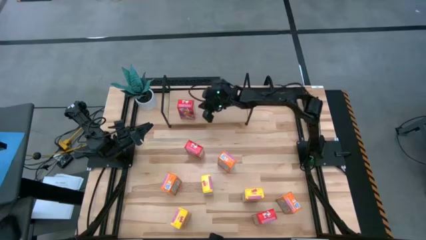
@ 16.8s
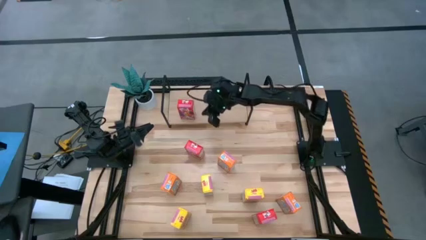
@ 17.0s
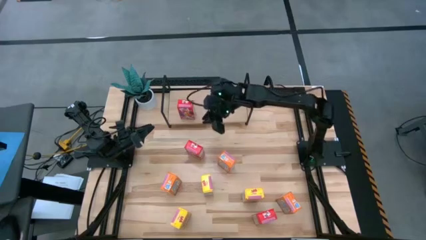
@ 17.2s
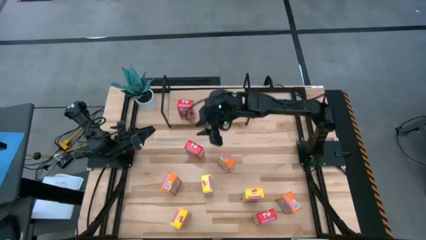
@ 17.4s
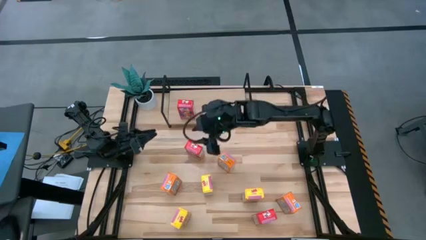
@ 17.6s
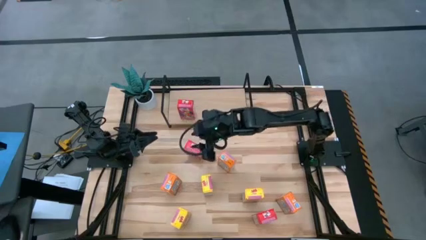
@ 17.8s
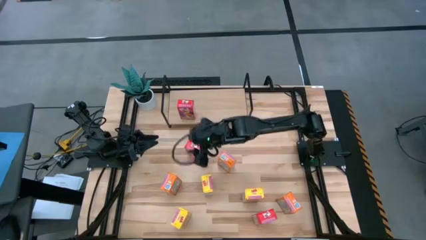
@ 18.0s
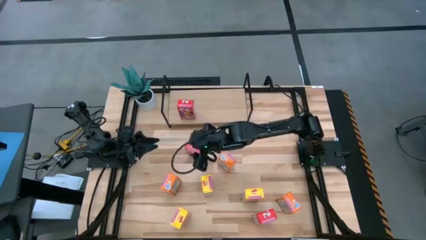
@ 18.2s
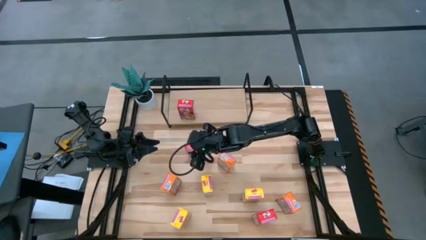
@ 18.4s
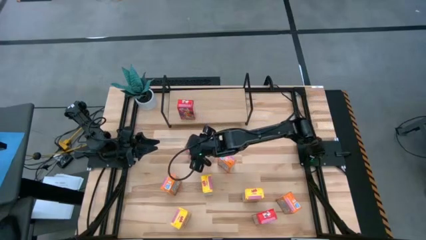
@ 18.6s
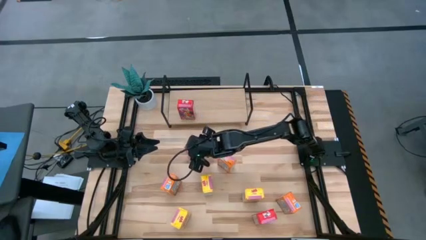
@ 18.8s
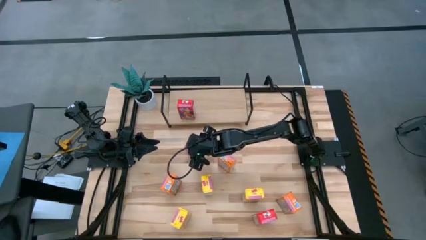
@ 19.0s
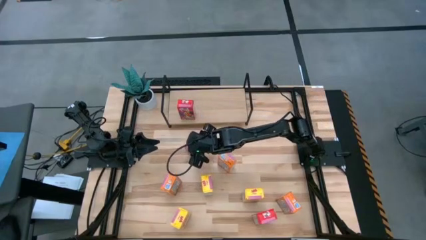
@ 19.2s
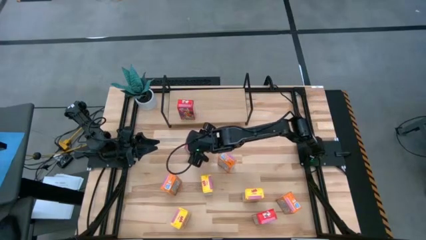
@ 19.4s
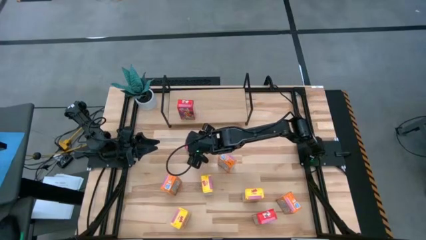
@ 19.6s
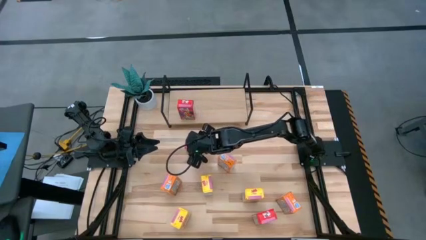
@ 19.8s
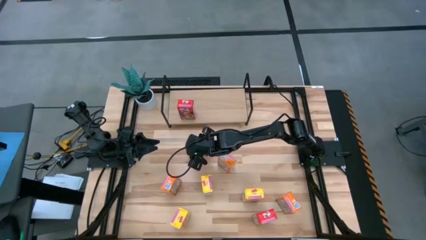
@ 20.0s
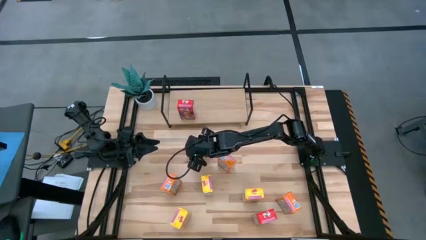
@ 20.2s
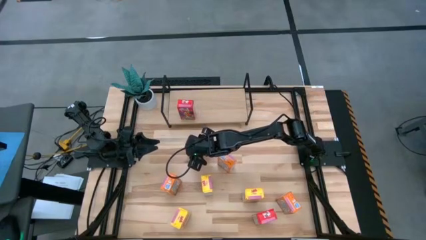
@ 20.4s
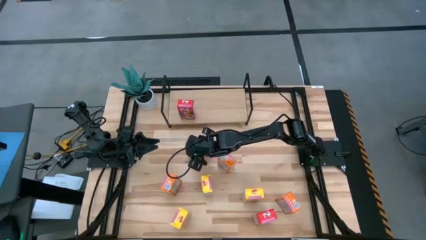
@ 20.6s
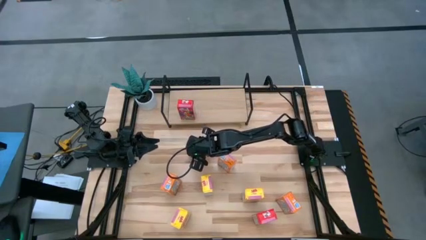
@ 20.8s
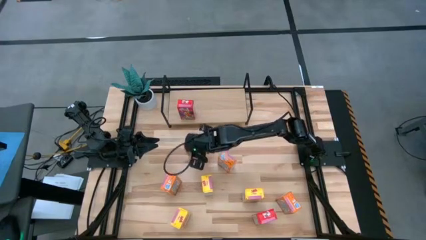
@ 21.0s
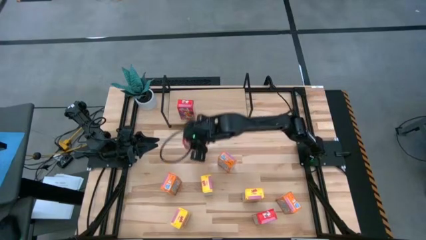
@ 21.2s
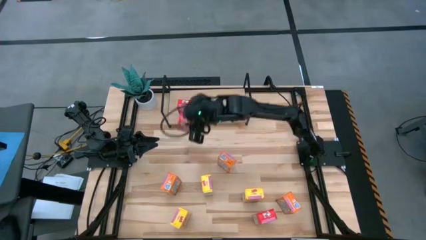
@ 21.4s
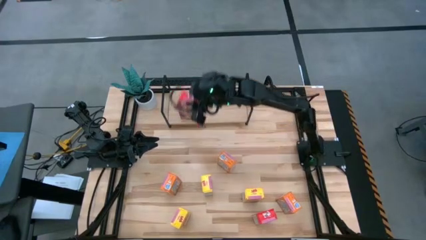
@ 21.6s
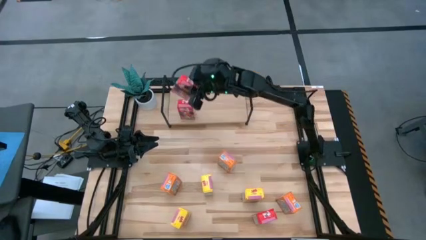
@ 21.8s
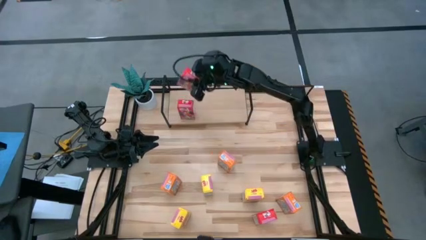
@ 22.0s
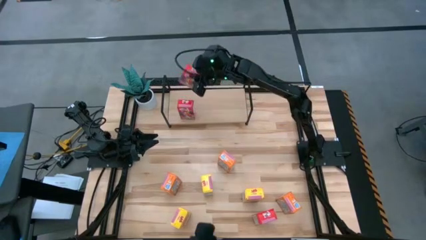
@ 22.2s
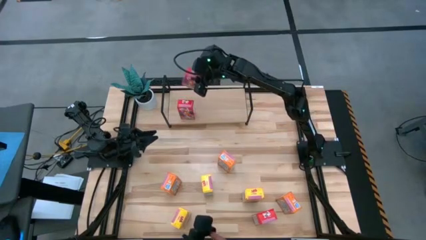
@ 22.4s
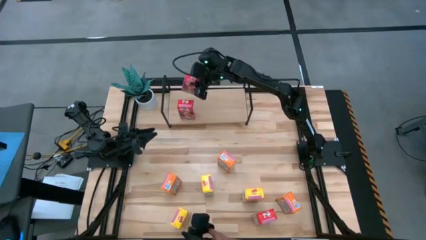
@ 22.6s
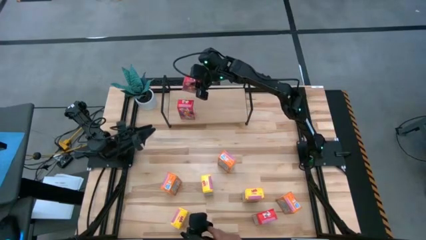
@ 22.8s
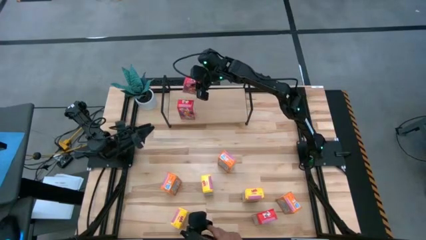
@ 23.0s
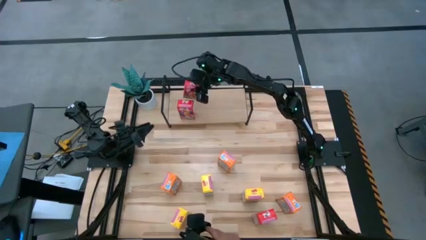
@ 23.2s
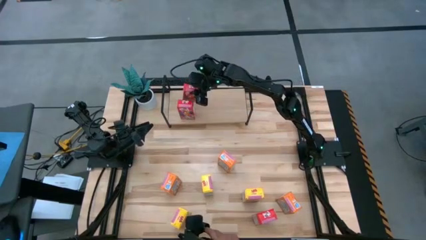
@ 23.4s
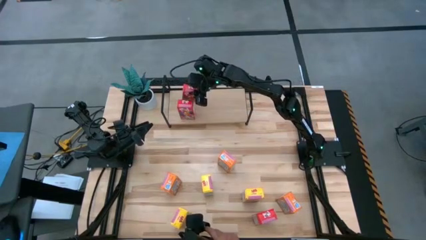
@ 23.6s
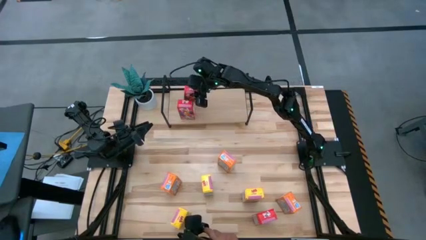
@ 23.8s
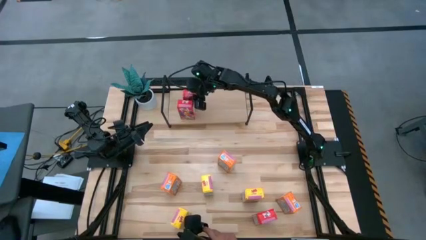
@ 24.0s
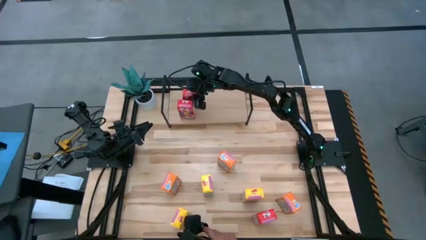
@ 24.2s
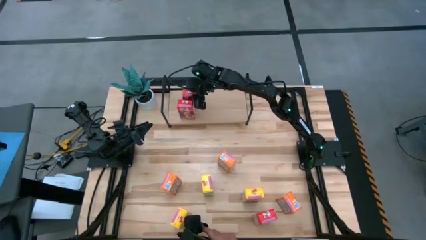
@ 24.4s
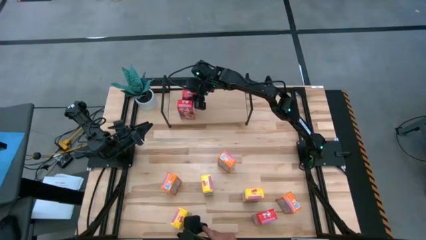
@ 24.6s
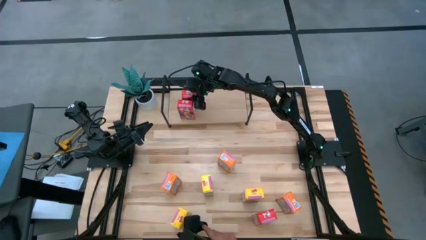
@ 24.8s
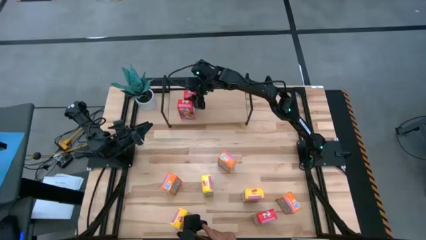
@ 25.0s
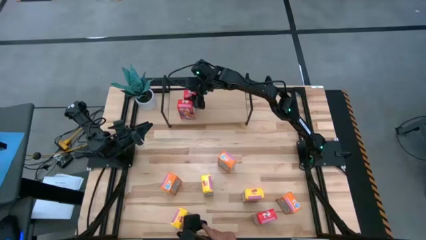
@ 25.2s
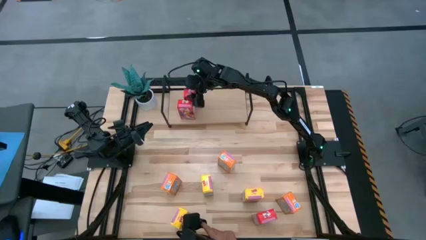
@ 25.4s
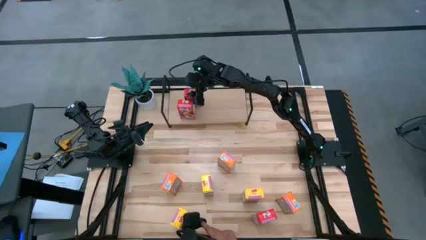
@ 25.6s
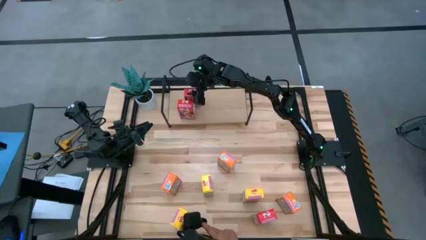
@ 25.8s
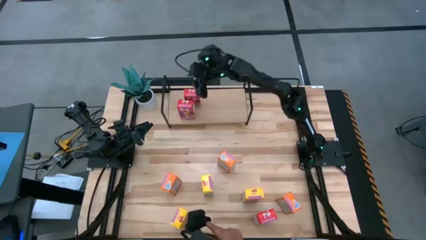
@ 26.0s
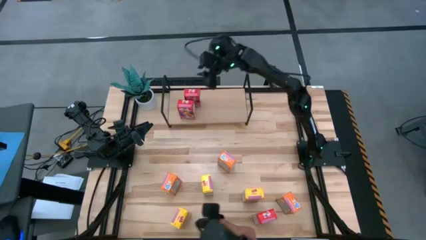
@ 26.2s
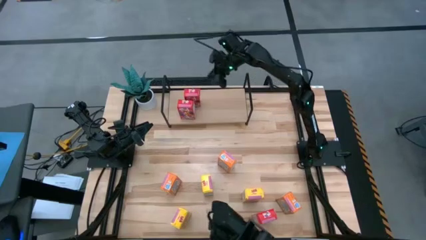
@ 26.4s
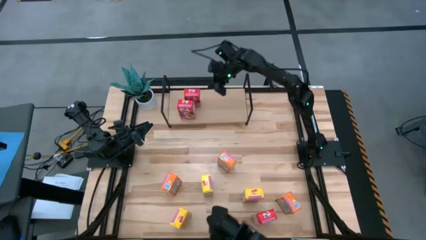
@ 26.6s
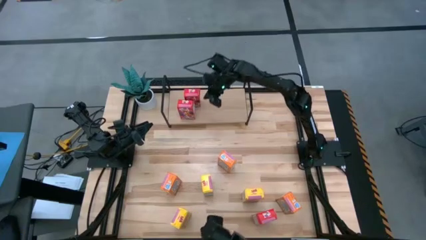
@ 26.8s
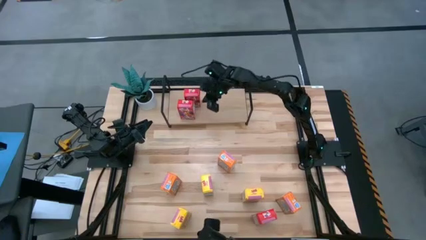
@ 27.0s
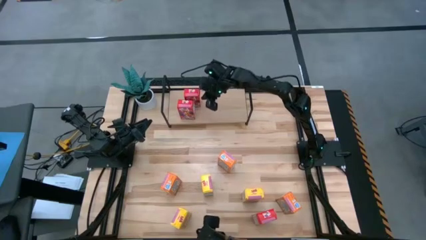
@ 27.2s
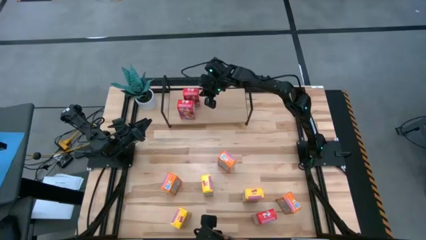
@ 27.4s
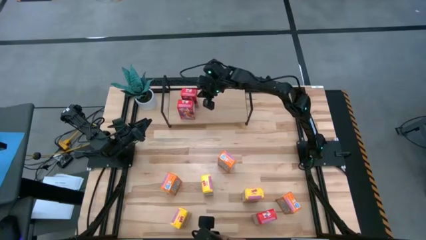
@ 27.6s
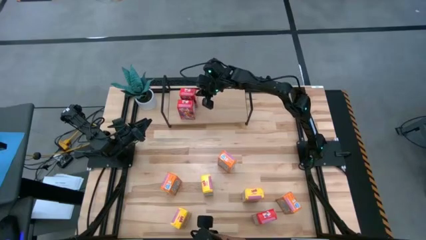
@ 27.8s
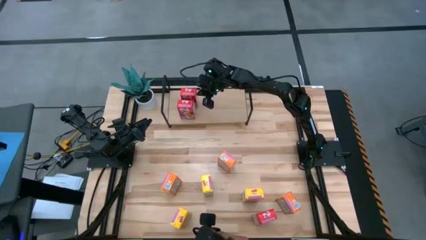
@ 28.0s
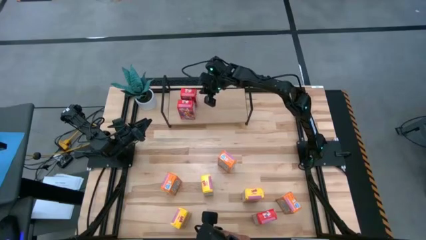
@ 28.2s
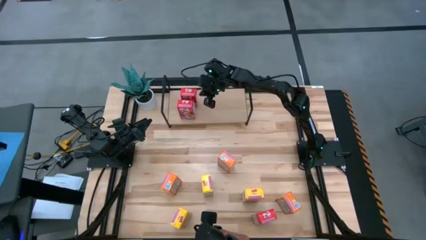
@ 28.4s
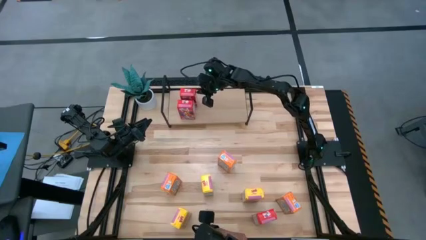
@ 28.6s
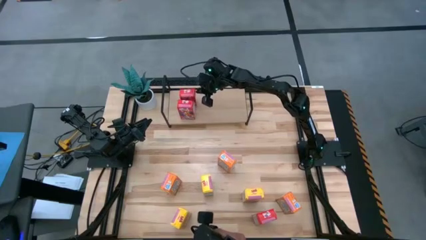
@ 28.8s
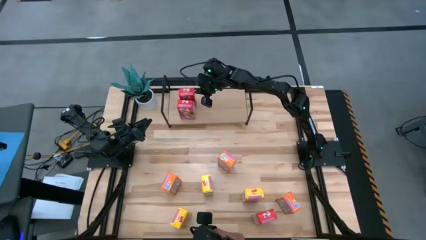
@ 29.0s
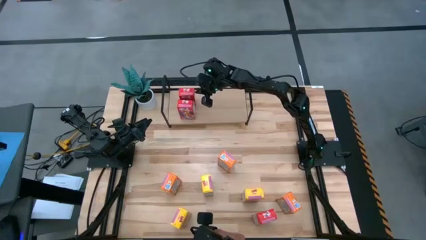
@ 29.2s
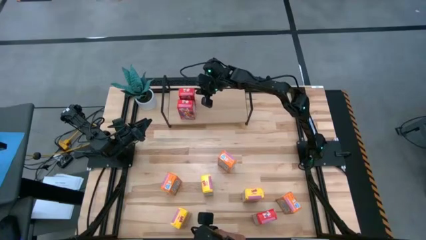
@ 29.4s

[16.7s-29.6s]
Task: Stack cereal on shelf
Put the top red cereal box on the shelf aligned with the other red cereal box
